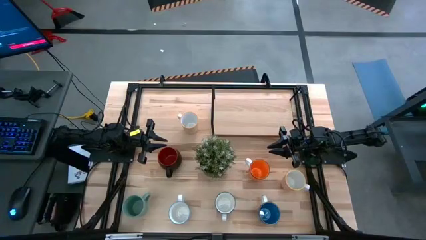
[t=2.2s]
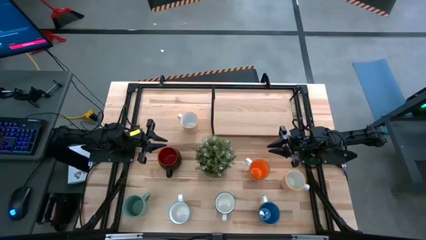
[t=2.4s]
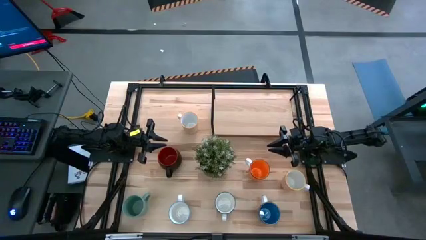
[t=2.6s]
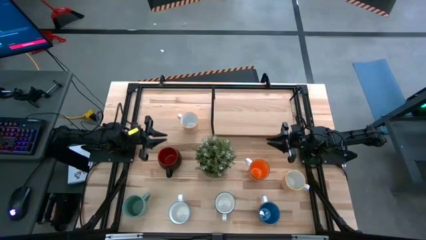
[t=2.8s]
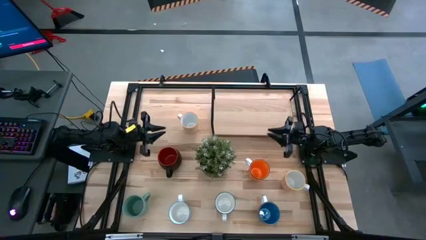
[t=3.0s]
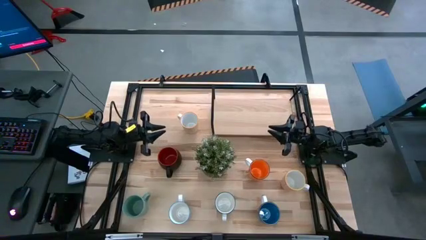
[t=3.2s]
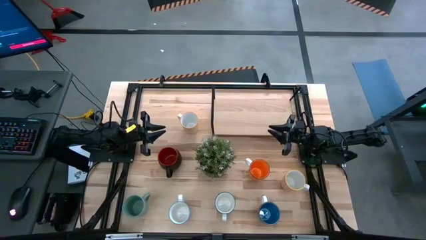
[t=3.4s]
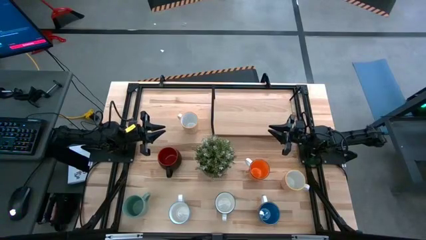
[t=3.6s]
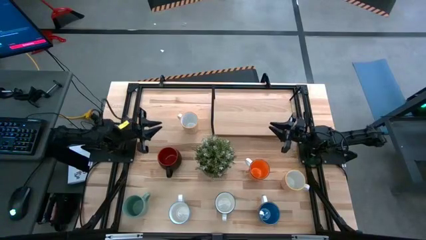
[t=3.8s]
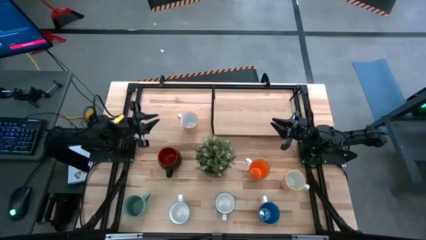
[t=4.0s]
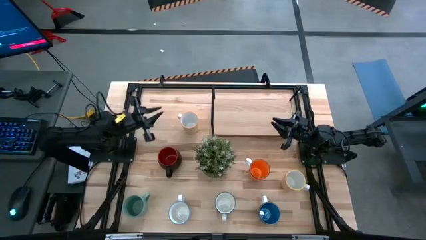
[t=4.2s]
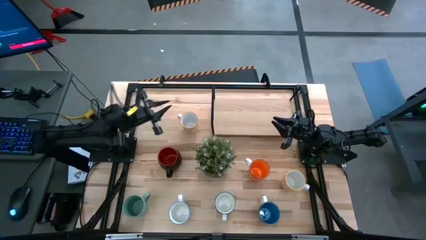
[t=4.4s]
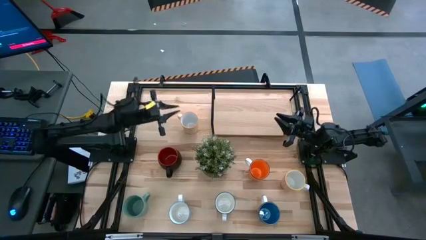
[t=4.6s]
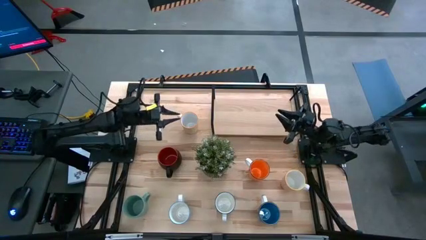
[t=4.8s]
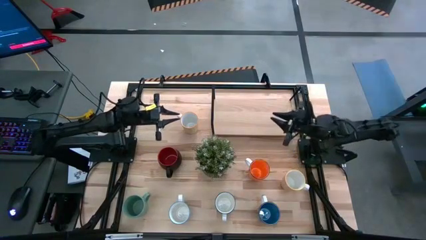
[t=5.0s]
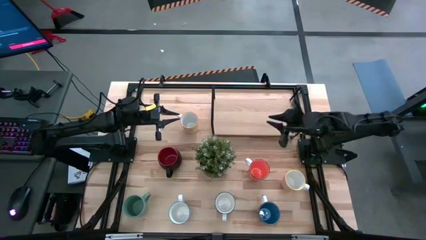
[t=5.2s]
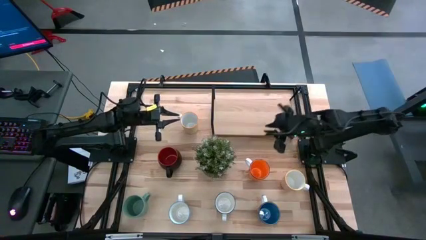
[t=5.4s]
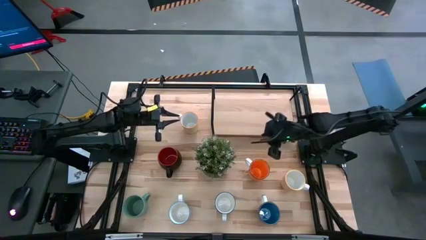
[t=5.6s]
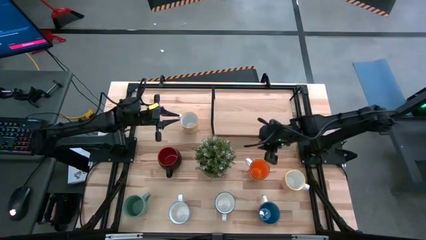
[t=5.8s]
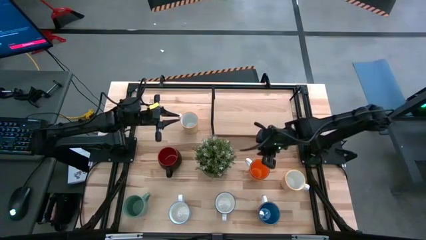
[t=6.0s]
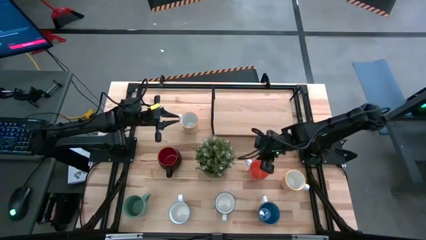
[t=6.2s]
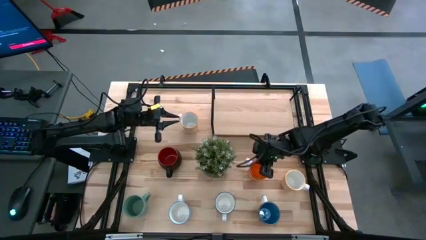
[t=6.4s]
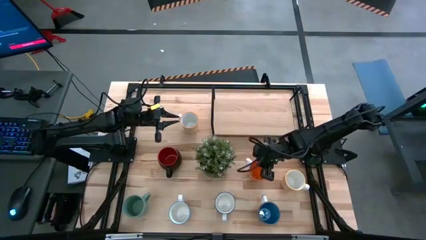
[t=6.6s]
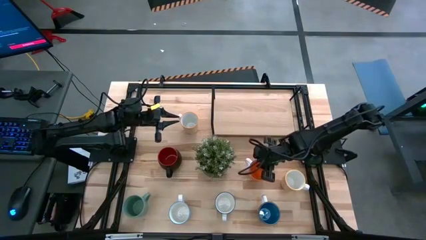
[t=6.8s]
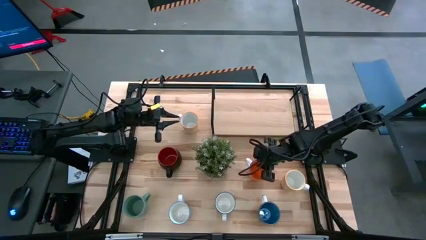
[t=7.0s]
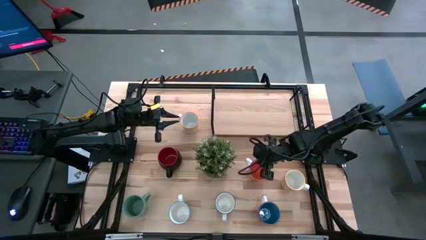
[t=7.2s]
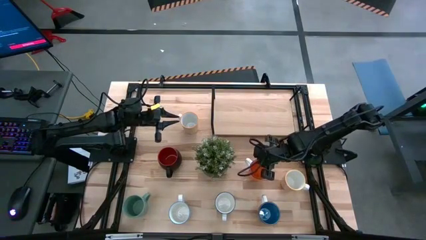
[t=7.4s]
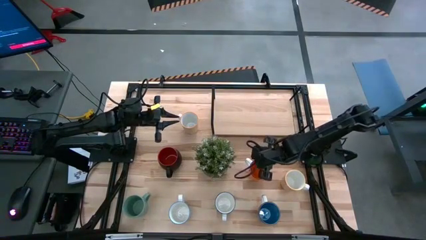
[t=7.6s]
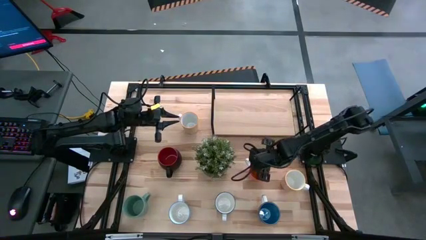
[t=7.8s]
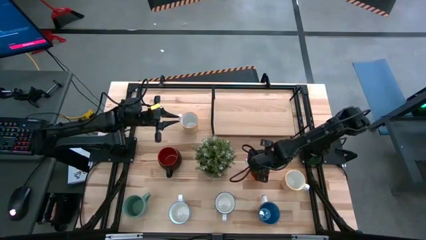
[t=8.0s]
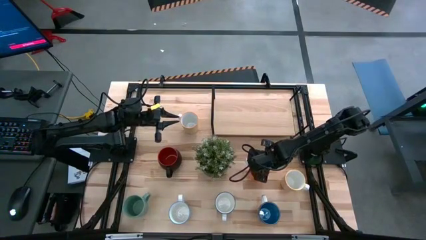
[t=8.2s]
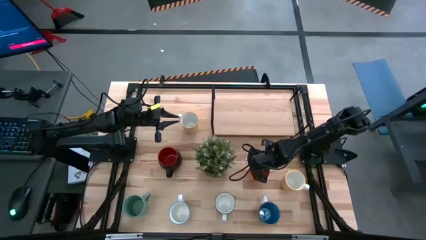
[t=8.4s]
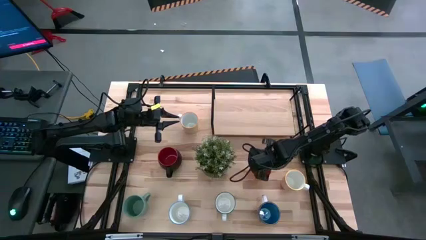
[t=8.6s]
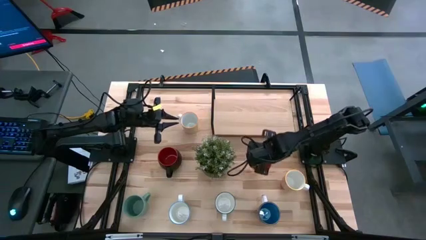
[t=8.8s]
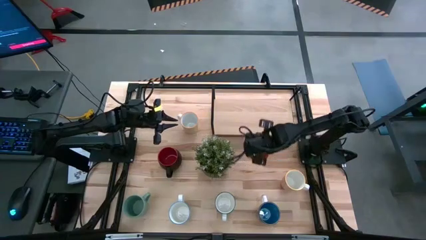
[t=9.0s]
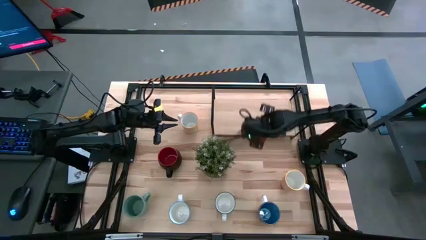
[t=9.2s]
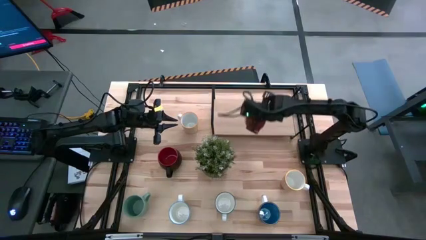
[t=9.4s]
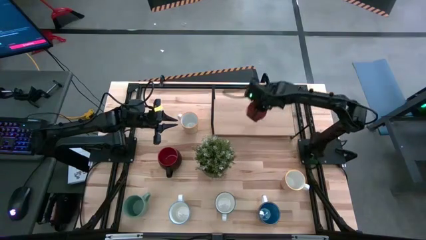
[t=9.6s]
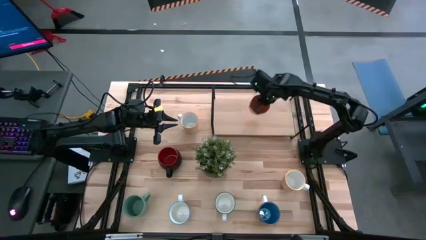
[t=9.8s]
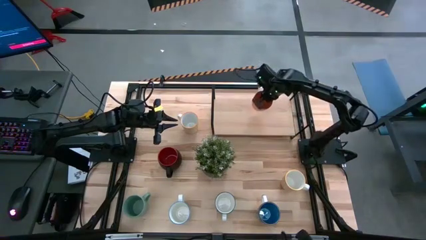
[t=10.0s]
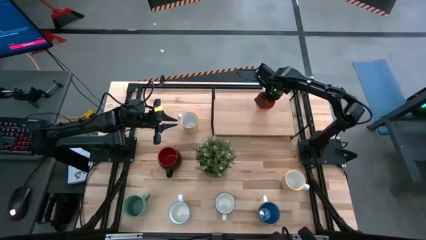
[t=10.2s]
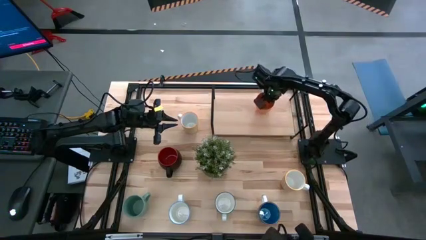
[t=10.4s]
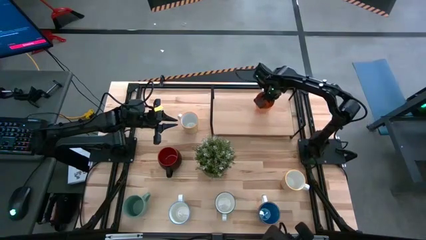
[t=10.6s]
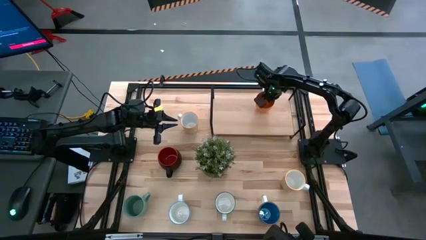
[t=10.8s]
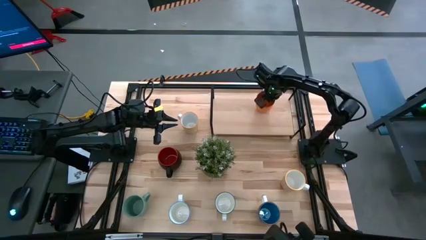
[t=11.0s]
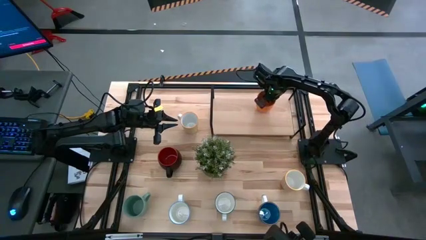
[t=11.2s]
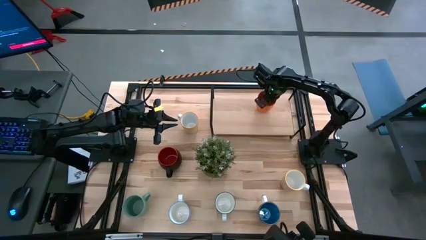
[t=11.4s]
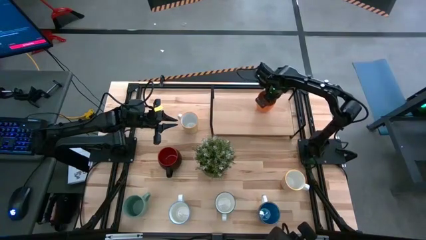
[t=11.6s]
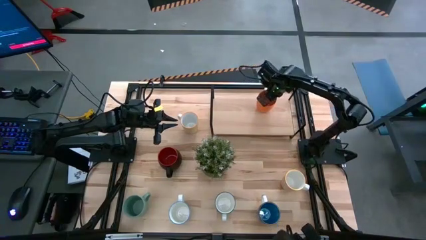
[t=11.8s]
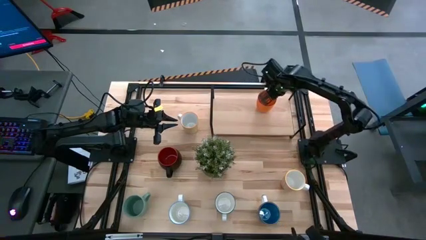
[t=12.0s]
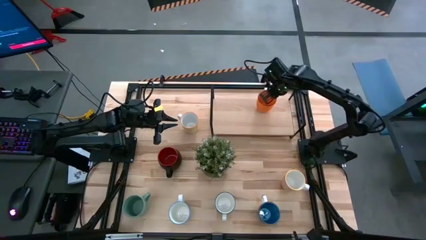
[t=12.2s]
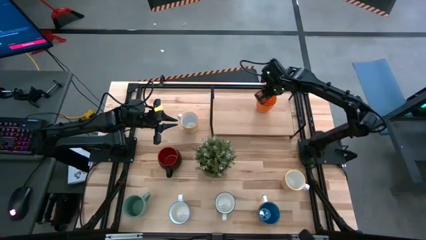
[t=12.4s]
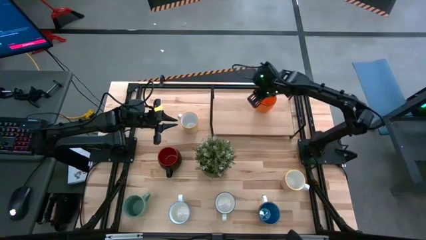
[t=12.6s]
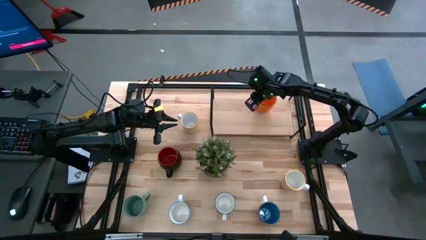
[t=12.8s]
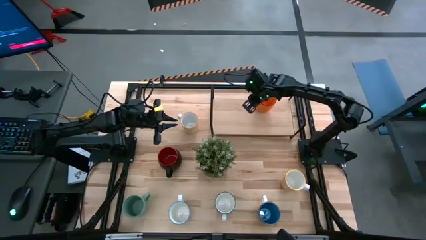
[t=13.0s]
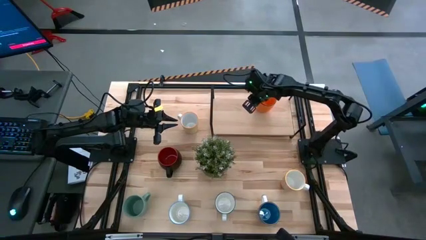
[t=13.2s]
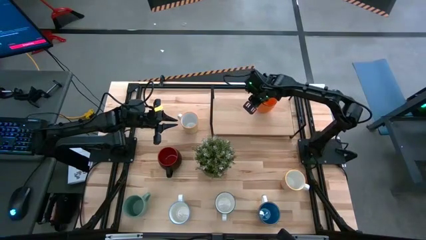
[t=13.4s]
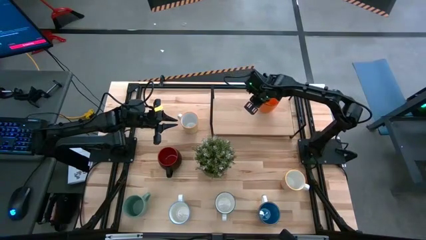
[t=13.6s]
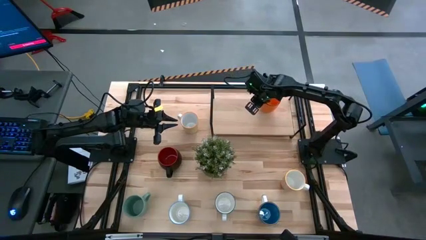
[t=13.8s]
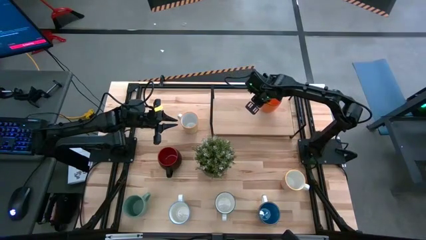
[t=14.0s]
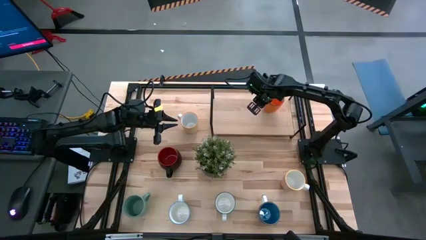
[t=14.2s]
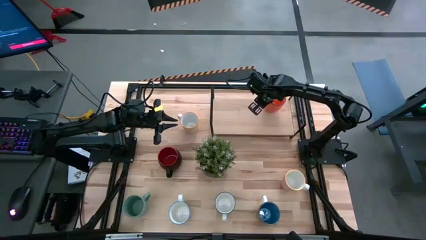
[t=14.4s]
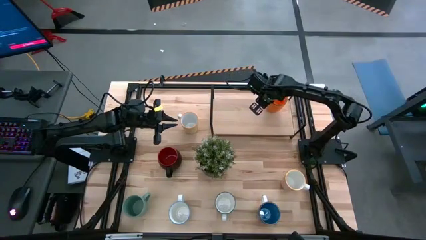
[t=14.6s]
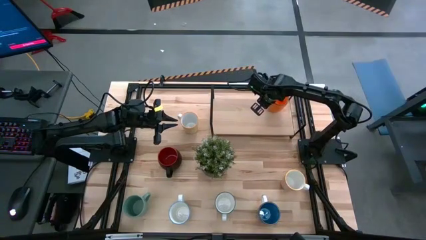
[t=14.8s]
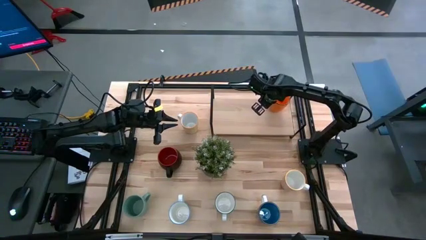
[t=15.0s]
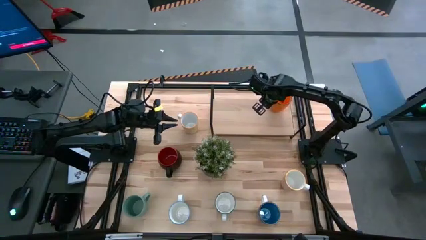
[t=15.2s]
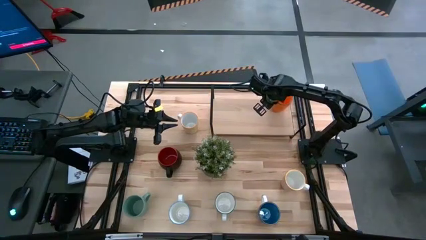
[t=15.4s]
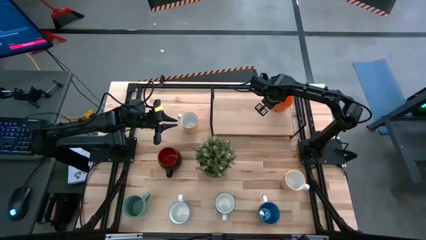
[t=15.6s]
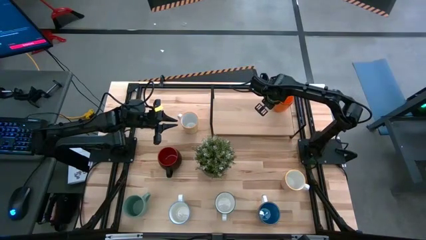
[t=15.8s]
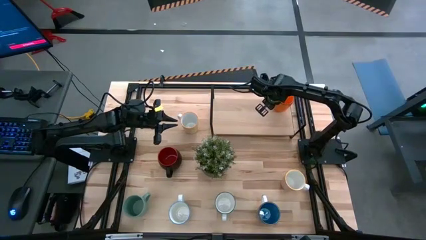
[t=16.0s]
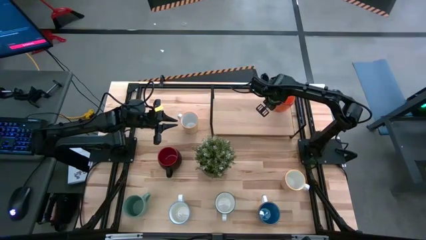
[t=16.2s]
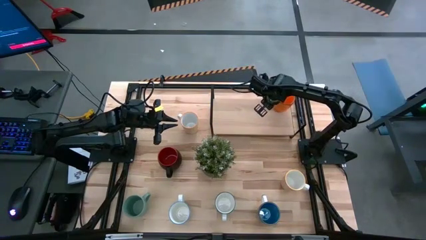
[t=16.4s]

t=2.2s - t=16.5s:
Task: Place coffee mugs
Put the orange mug on the shelf
